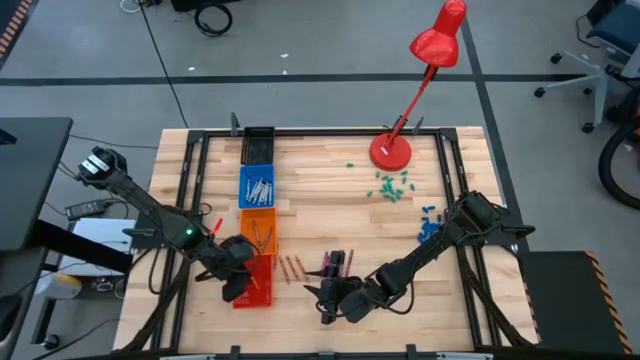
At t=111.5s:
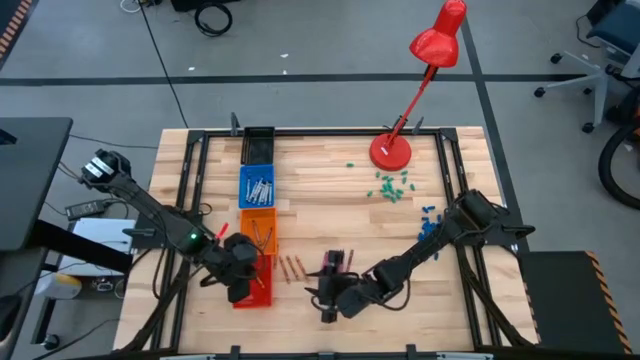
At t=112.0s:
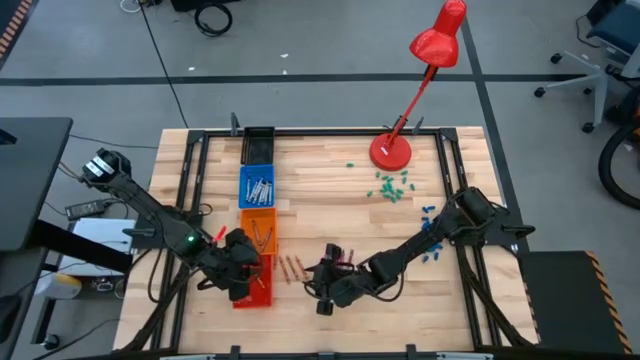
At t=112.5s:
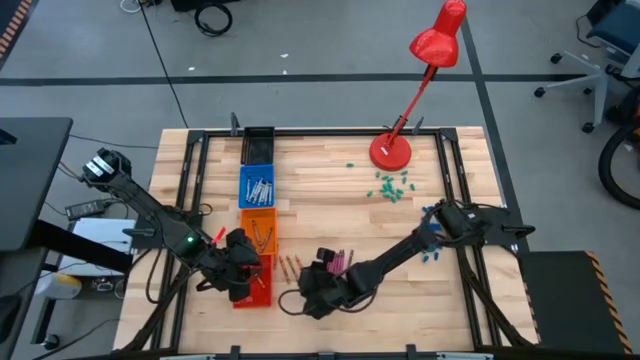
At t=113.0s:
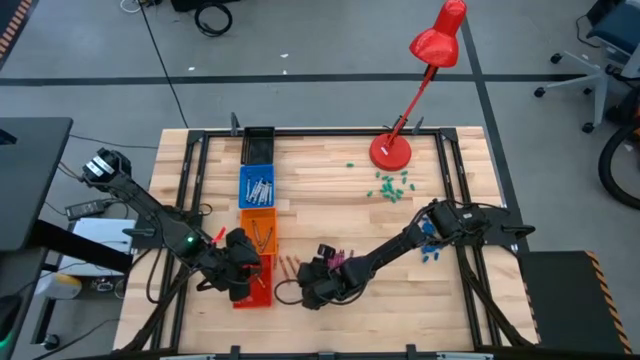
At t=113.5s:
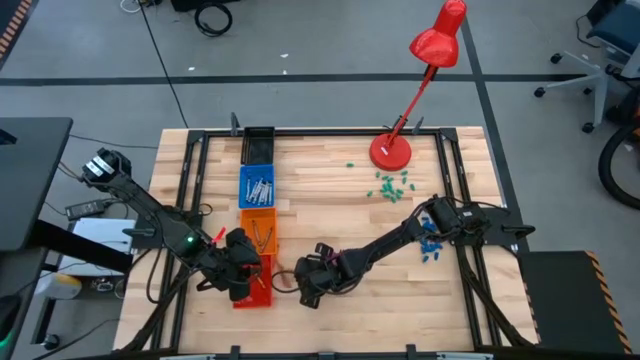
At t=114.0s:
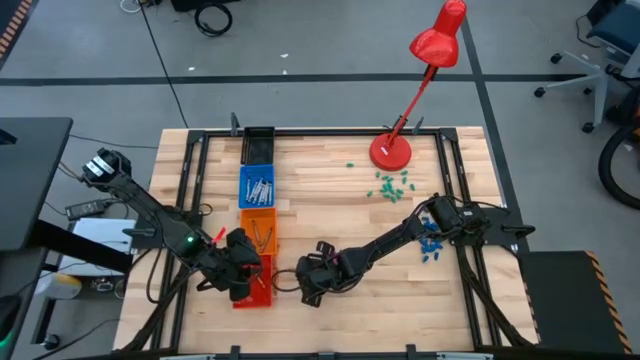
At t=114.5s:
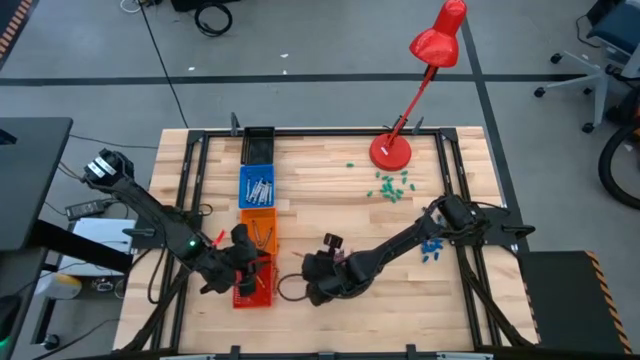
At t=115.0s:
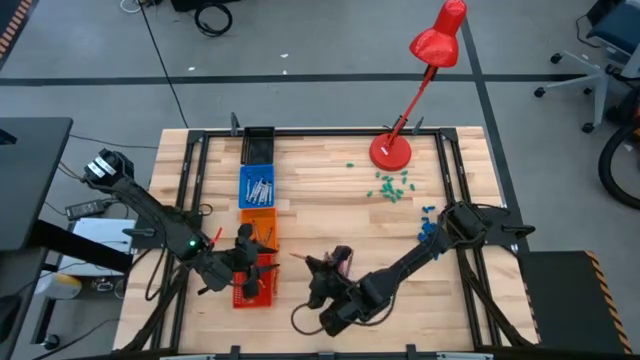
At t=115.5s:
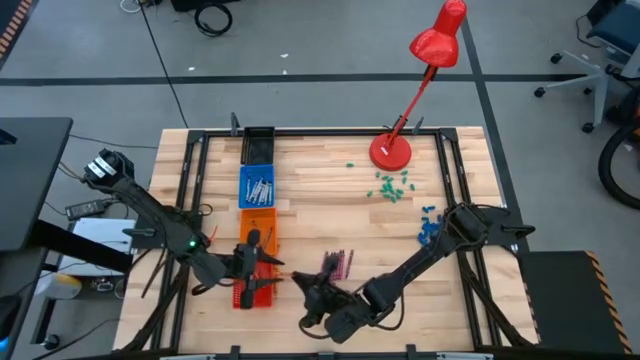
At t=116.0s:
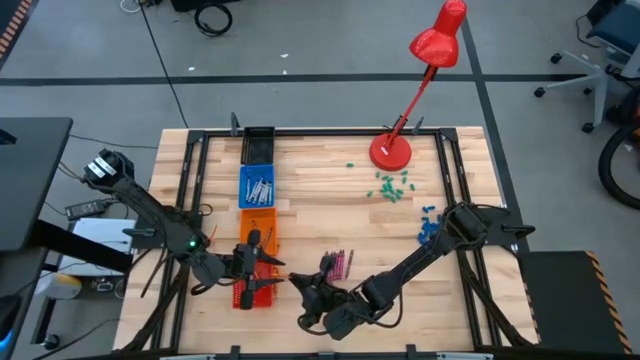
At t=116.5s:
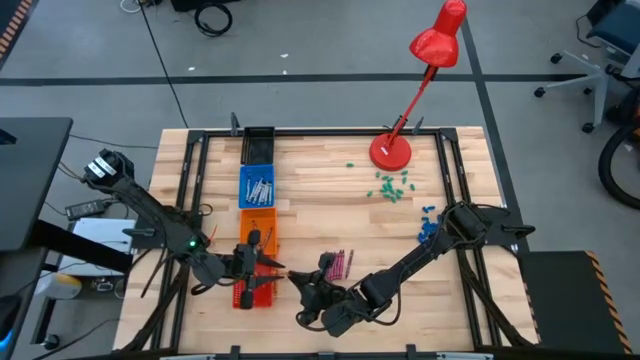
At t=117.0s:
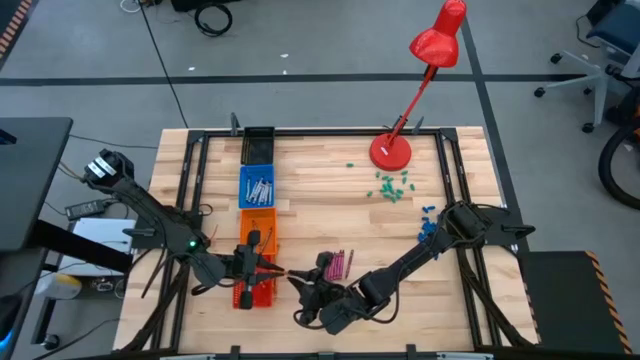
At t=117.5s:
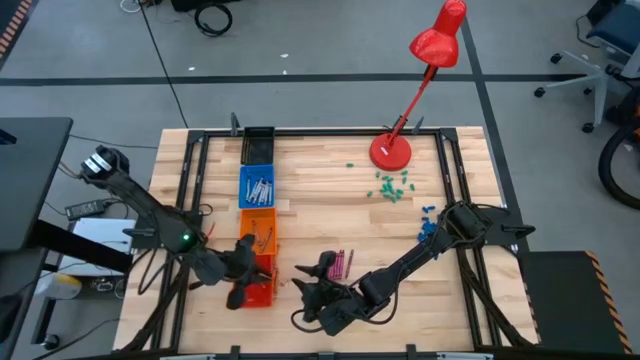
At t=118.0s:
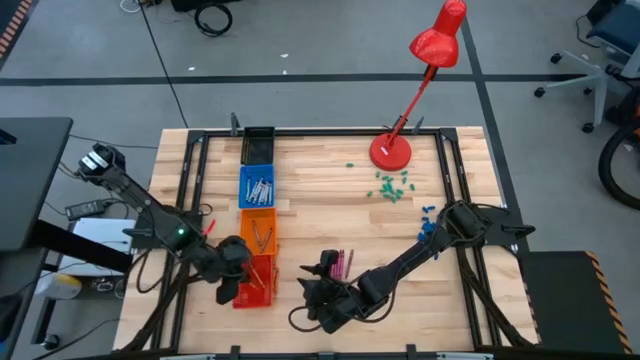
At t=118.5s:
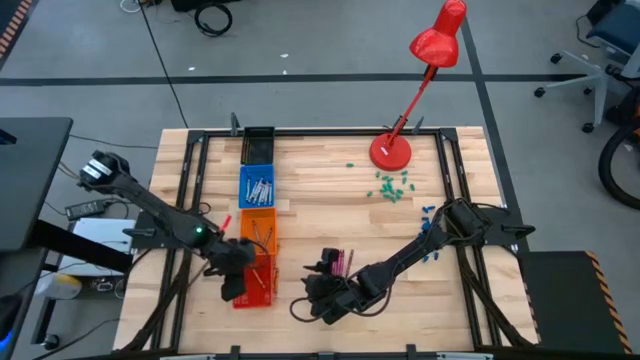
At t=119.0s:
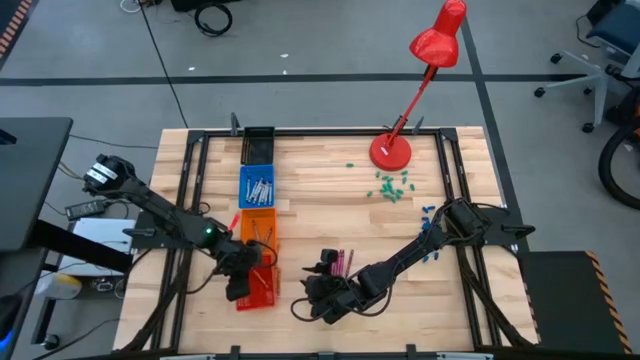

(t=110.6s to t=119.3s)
Task: Sort crayons
Put the orange crayon into the red bin

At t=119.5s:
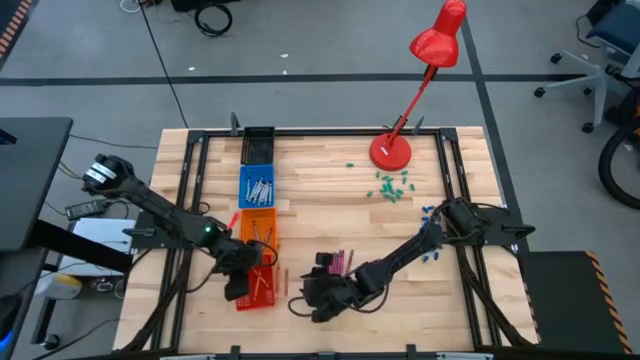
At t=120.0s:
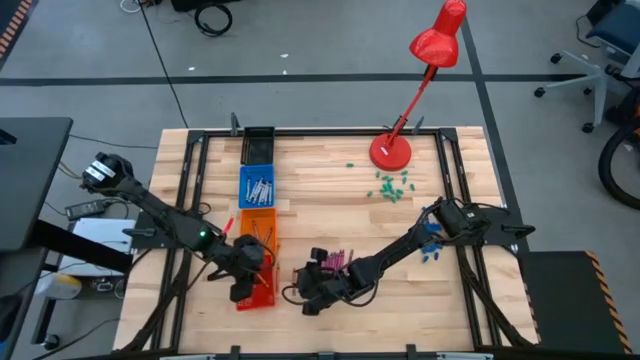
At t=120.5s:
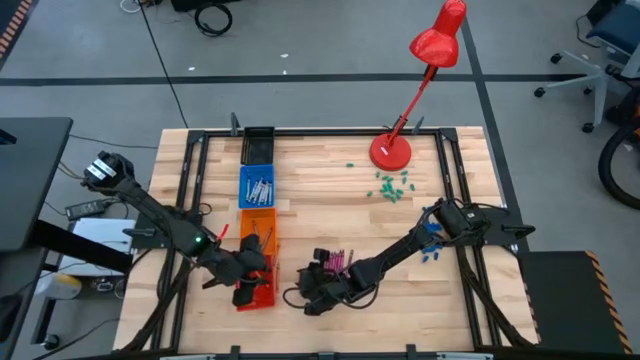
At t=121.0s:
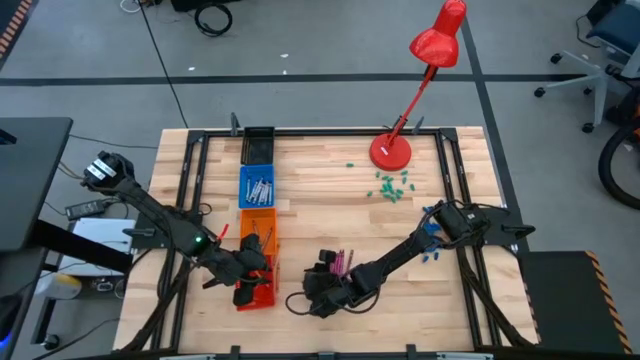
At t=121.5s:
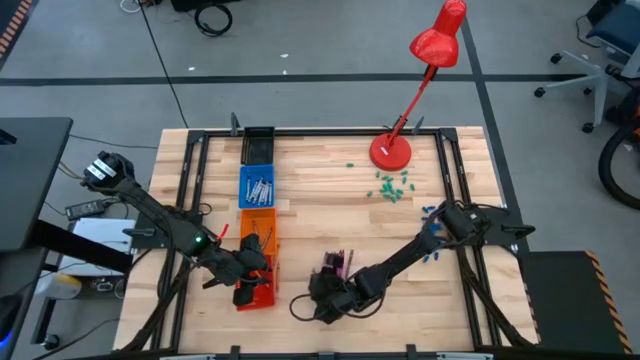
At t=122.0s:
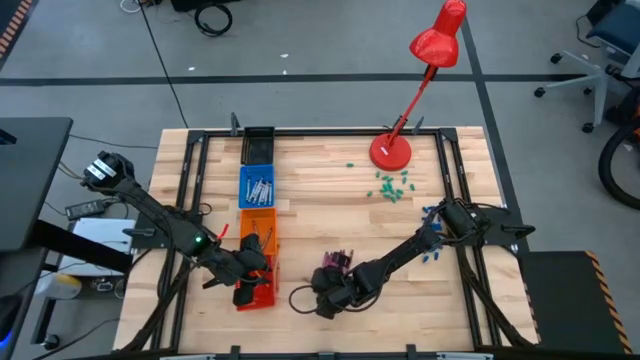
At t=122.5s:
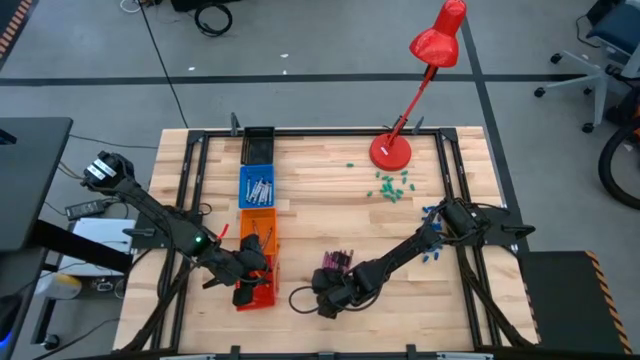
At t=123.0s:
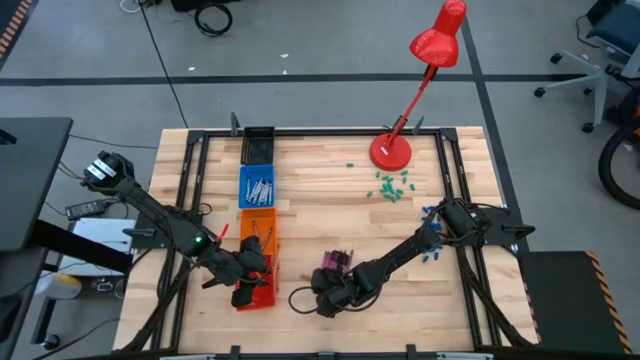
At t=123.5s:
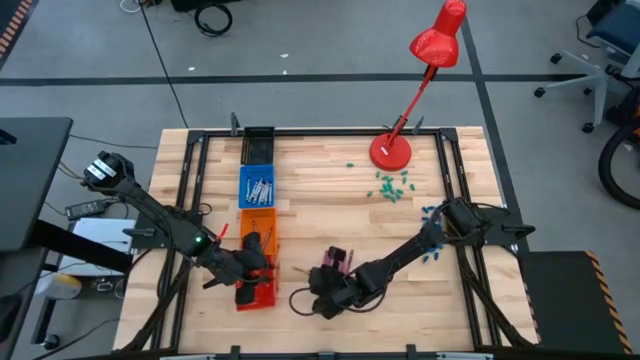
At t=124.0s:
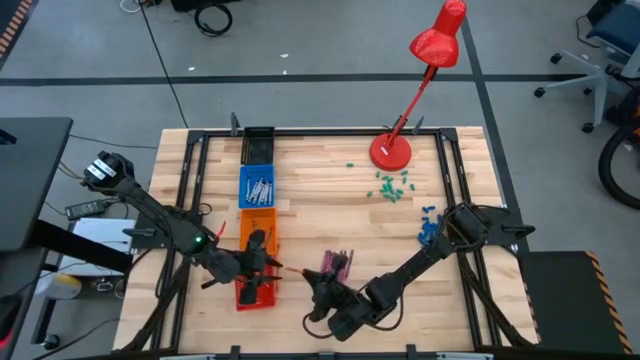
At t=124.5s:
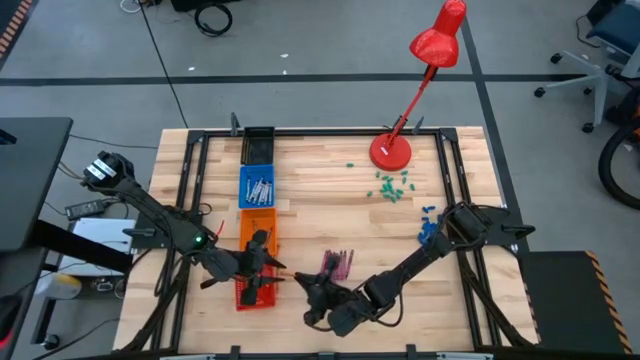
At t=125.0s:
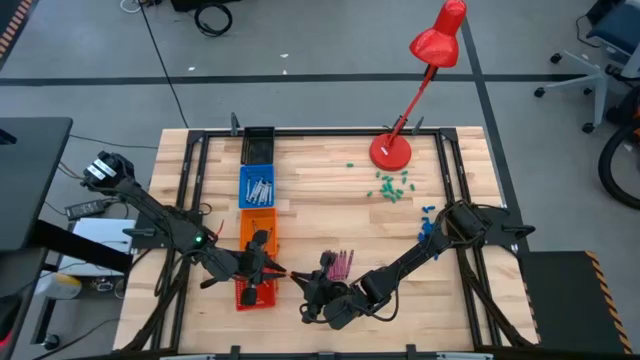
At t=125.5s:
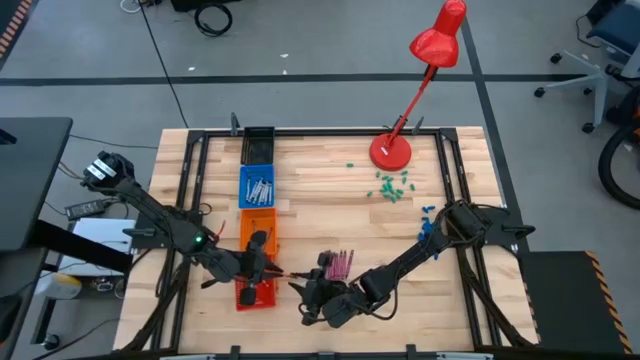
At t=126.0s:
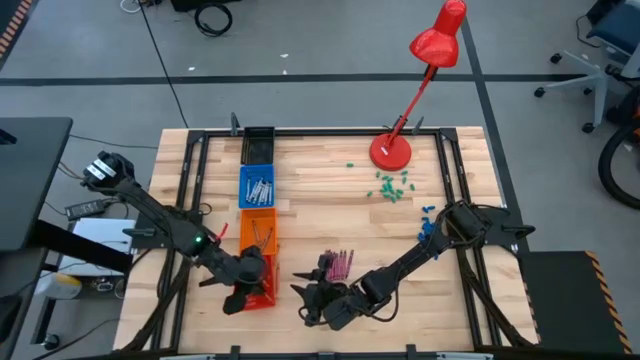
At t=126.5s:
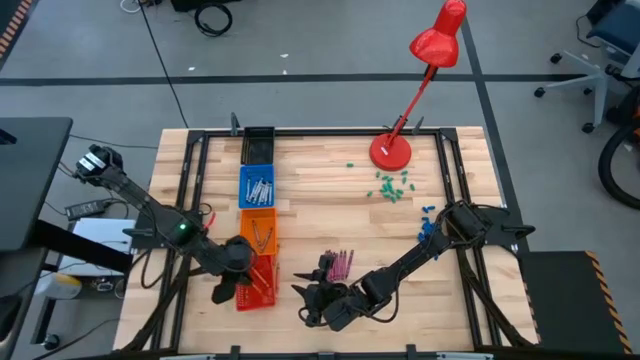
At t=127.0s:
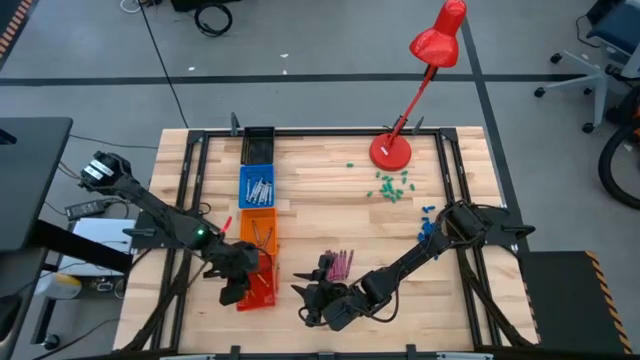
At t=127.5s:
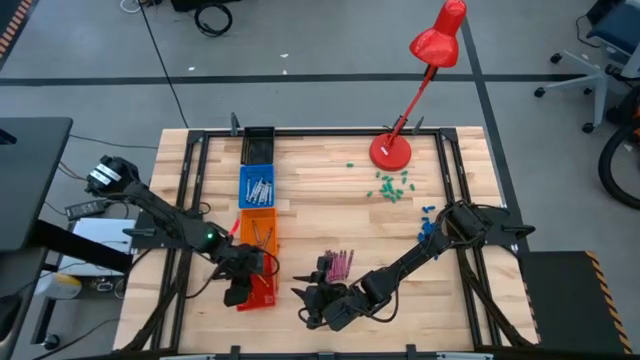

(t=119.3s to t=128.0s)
Put the orange crayon into the red bin
